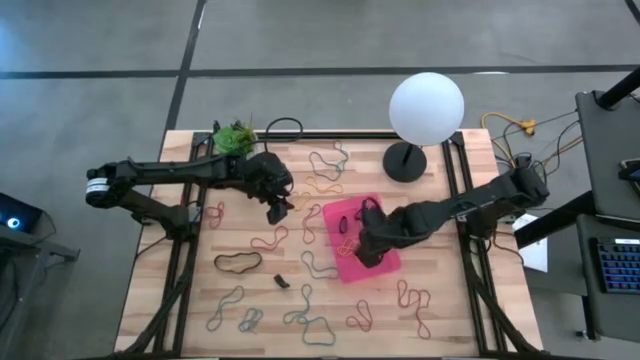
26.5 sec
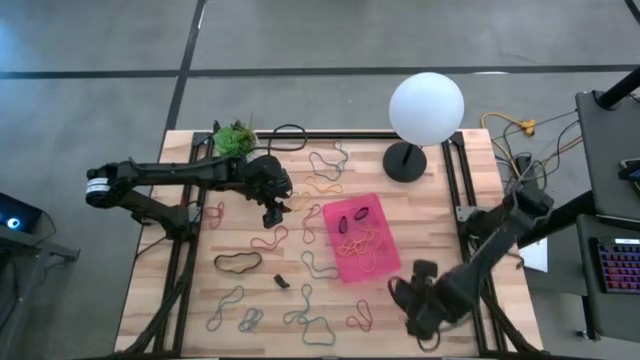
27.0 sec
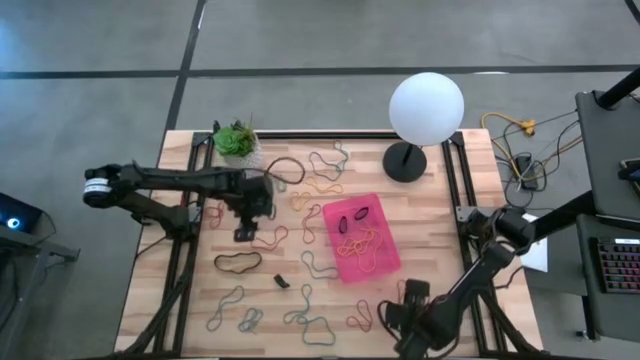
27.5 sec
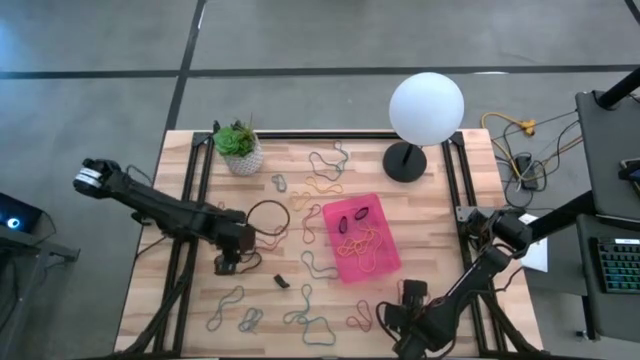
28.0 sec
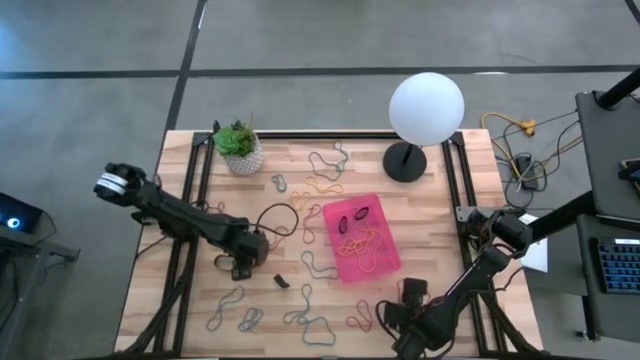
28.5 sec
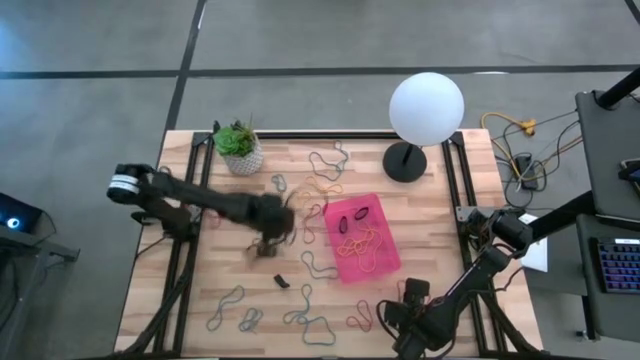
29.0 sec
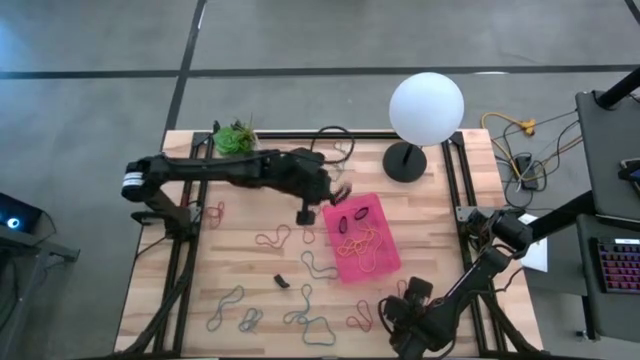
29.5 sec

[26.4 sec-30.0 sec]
Task: Pick and place rubber bands into bin
Put the black rubber band into the pink bin

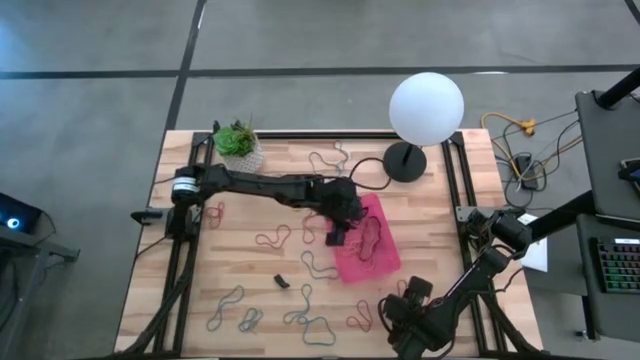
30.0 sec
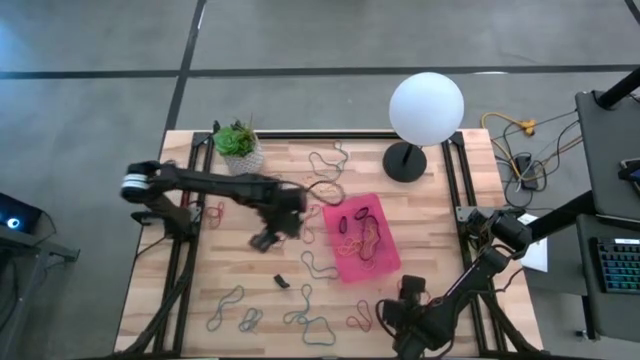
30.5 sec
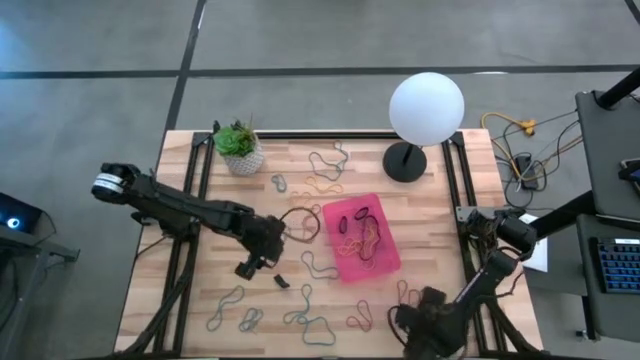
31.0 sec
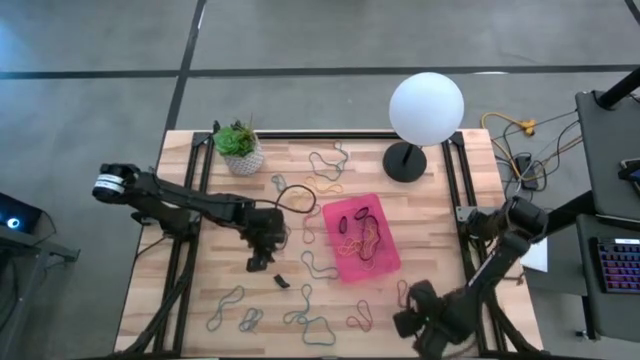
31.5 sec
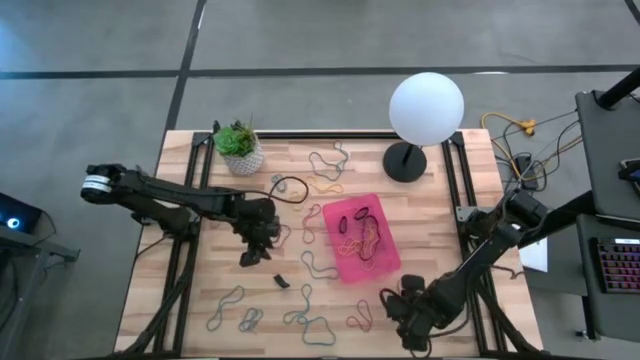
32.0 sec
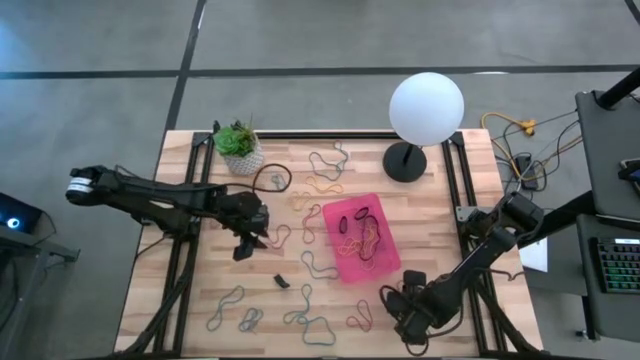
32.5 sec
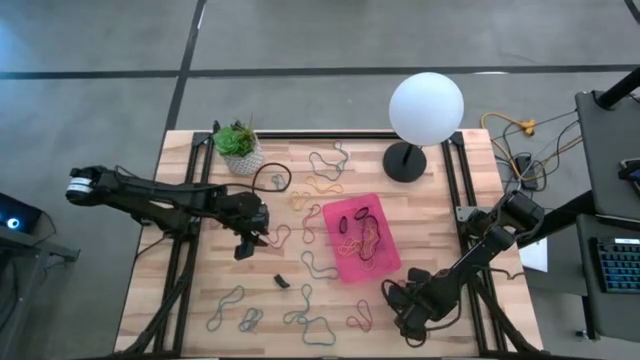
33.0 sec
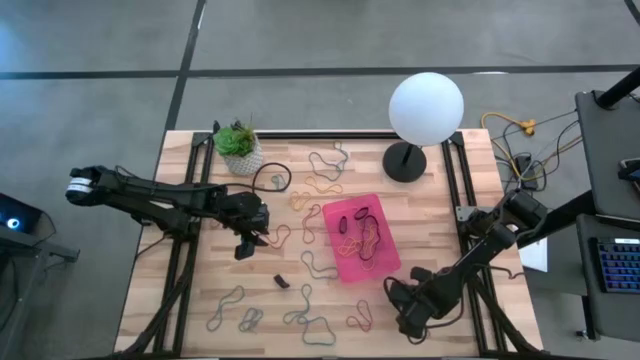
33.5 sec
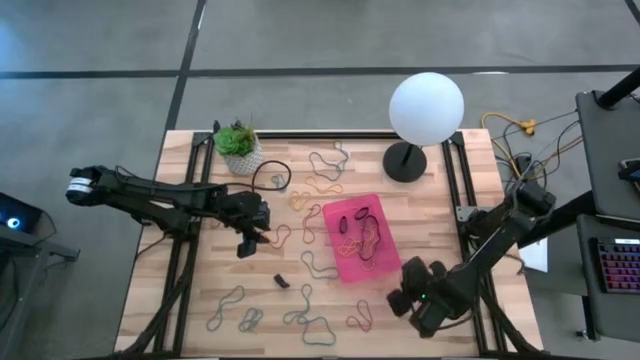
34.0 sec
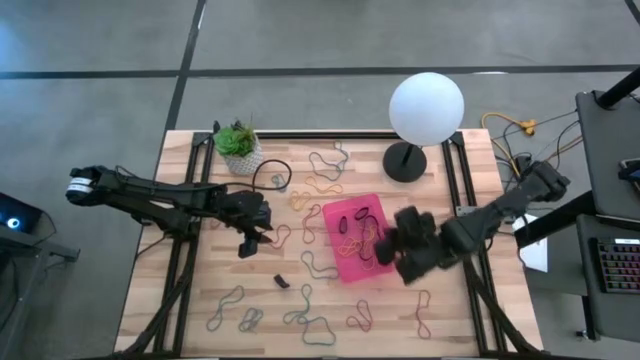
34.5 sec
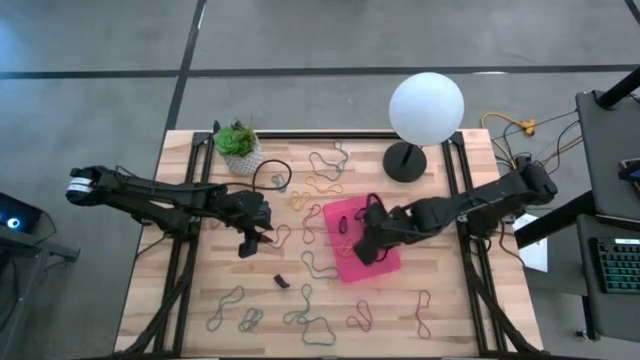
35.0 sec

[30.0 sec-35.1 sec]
Put the red rubber band into the pink bin

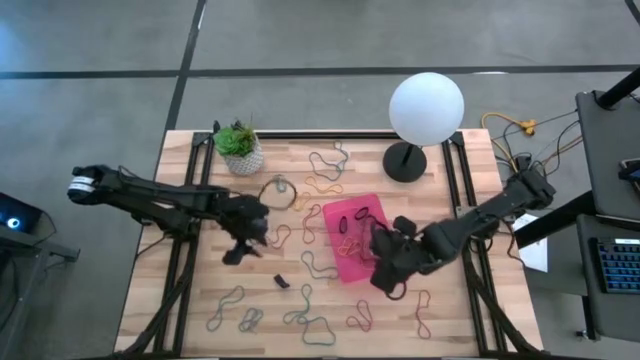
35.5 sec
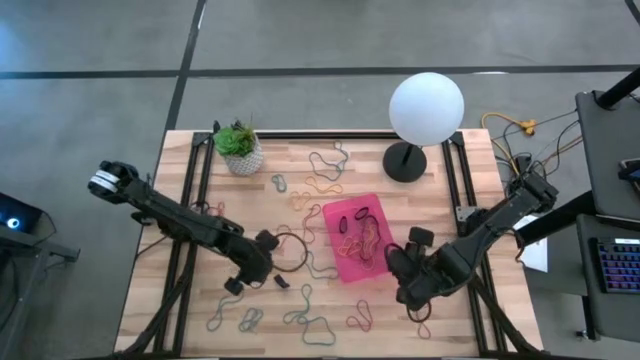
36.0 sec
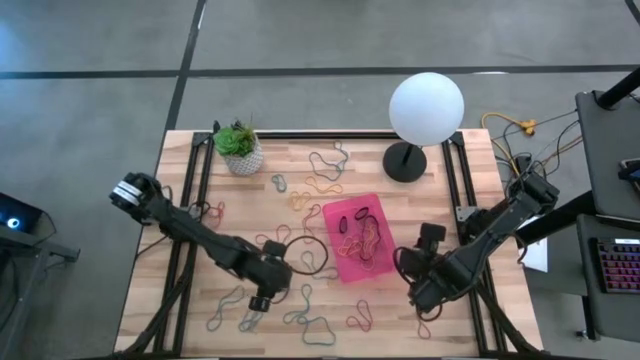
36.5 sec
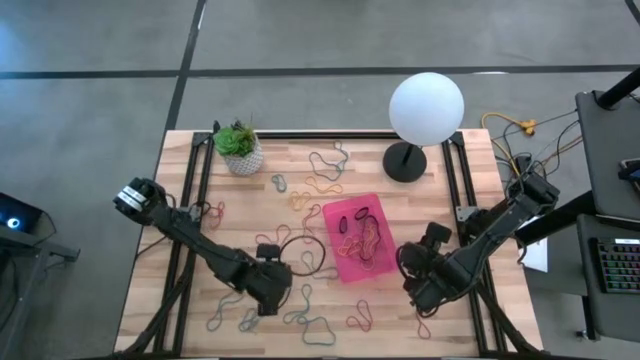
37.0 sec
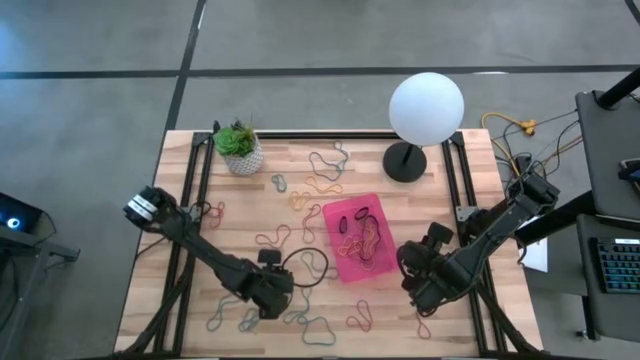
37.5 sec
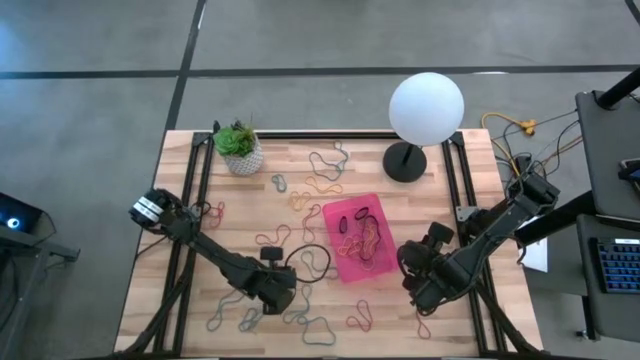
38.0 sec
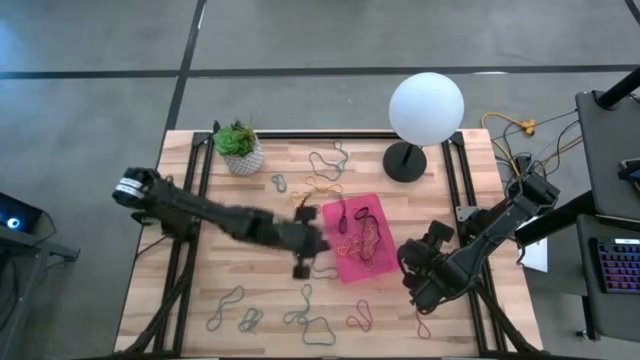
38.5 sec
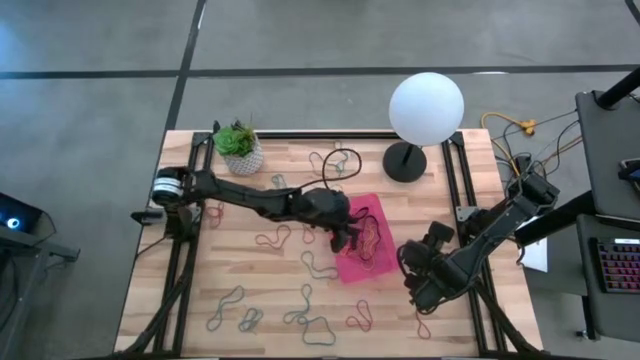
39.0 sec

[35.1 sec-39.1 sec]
Put the black rubber band into the pink bin

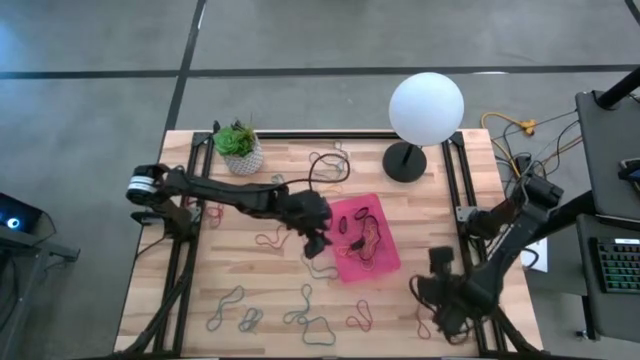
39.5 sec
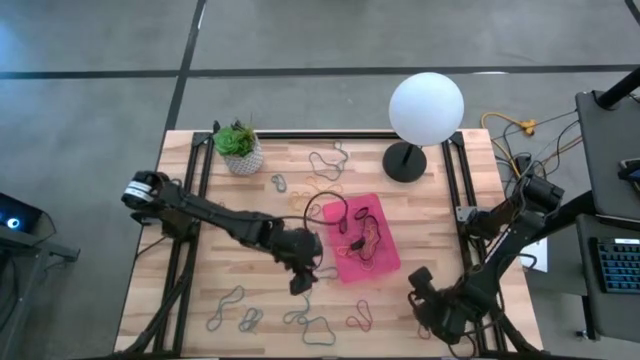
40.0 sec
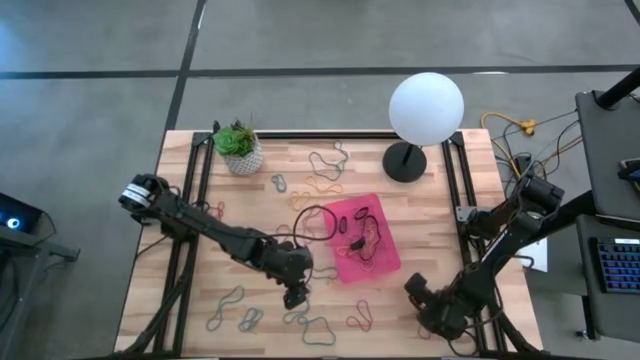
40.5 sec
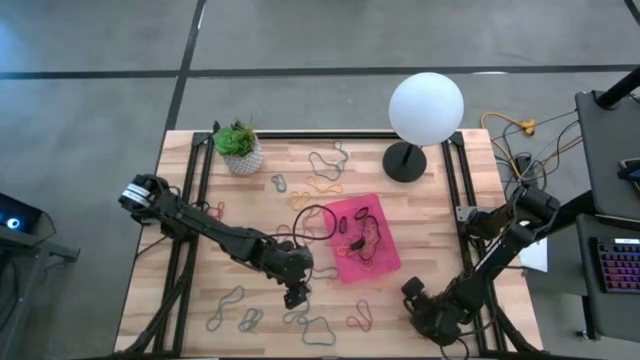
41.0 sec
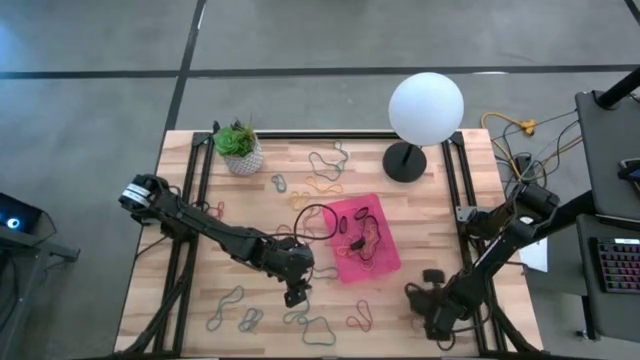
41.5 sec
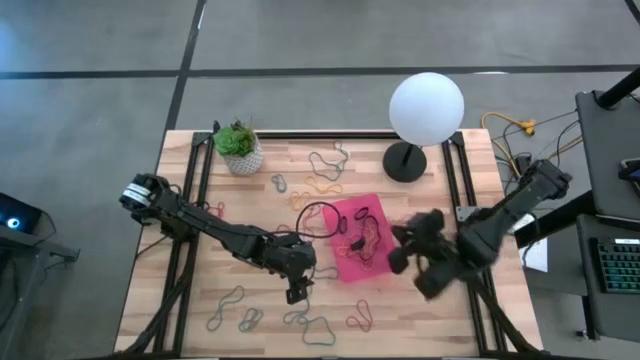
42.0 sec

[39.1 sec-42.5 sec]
Put the red rubber band into the pink bin

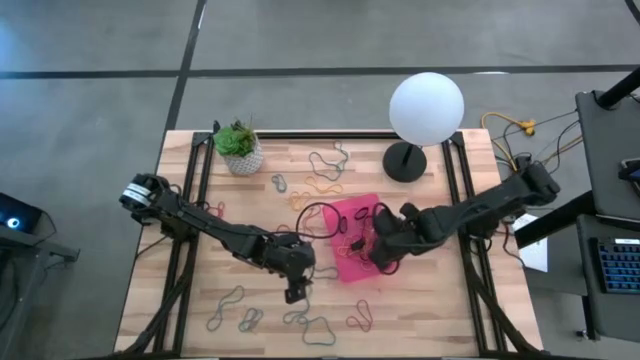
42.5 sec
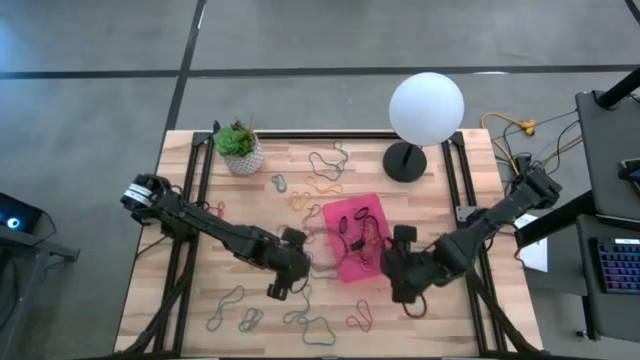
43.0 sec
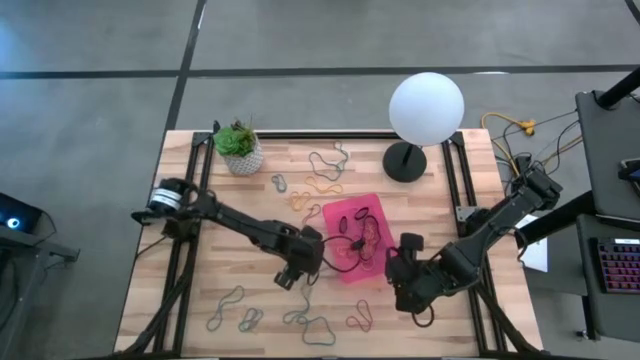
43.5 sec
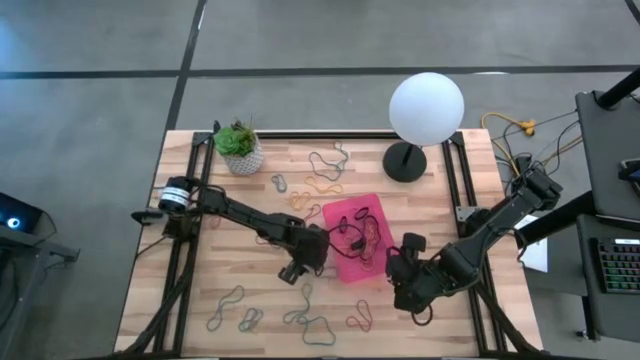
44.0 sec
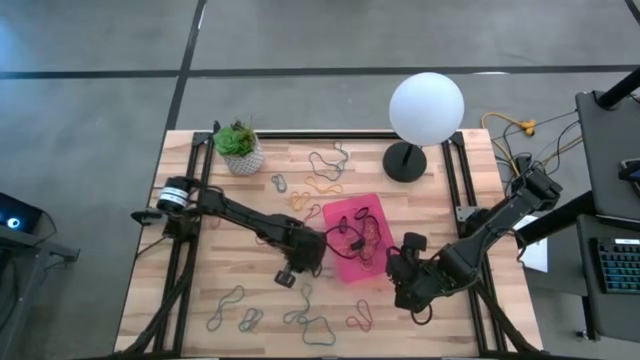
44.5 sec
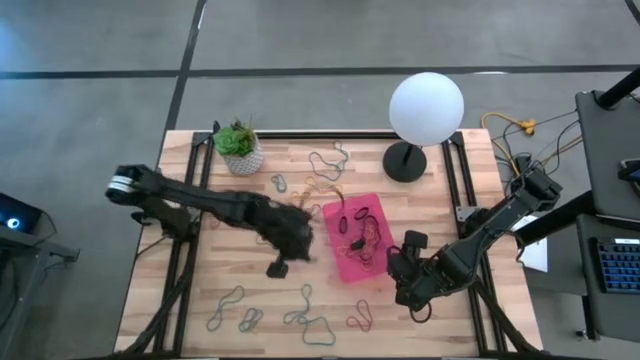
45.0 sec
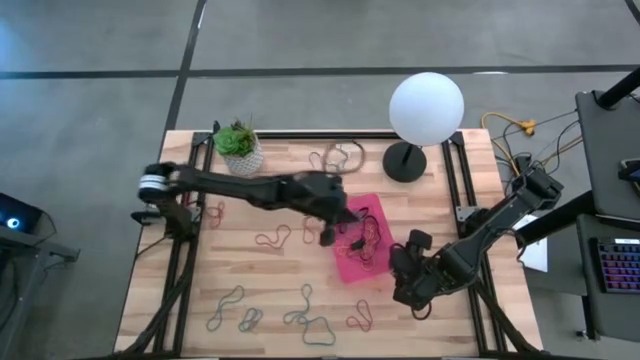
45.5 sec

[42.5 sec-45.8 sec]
Put the blue rubber band into the pink bin

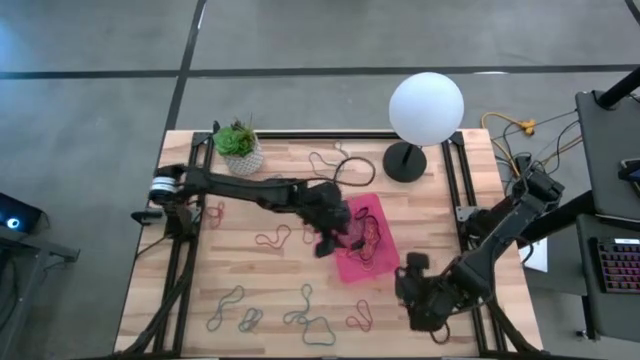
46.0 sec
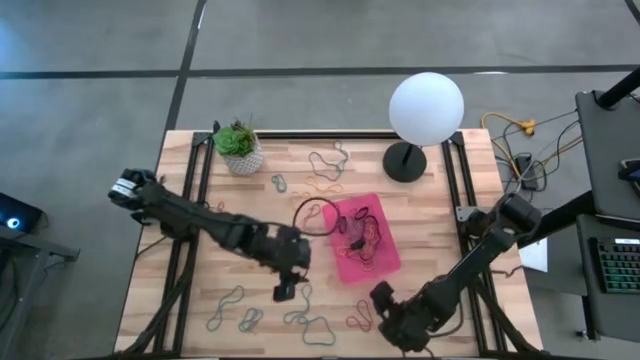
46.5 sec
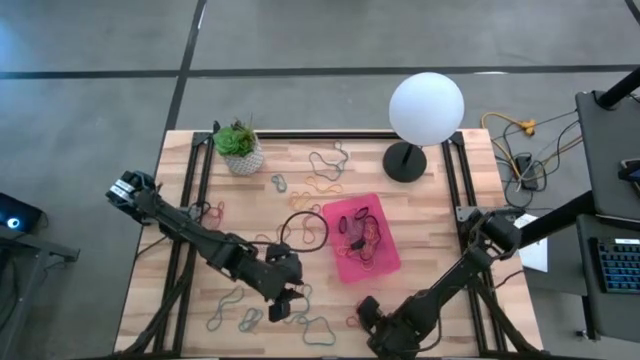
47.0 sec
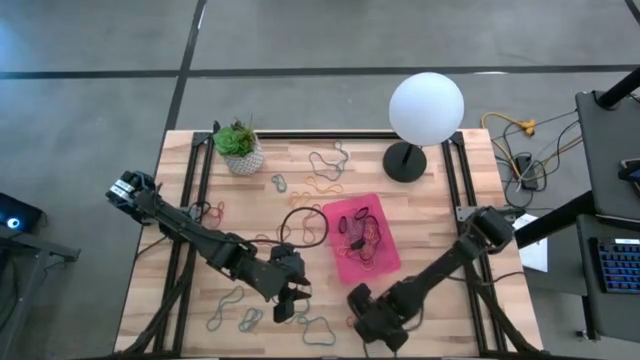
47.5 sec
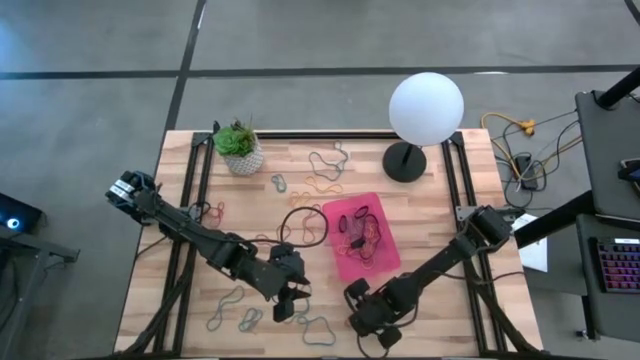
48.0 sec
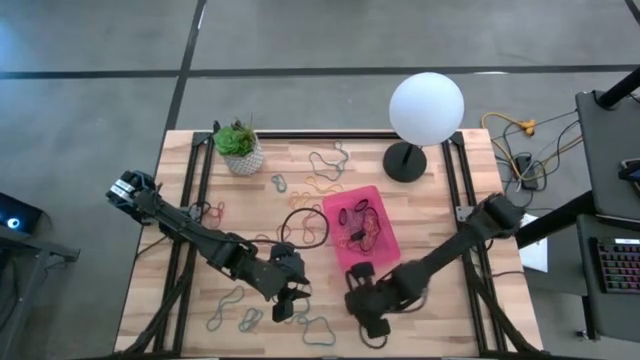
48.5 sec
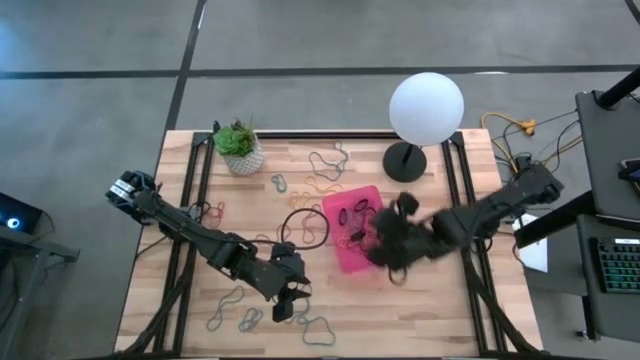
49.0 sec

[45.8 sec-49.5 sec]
Put the red rubber band into the pink bin
